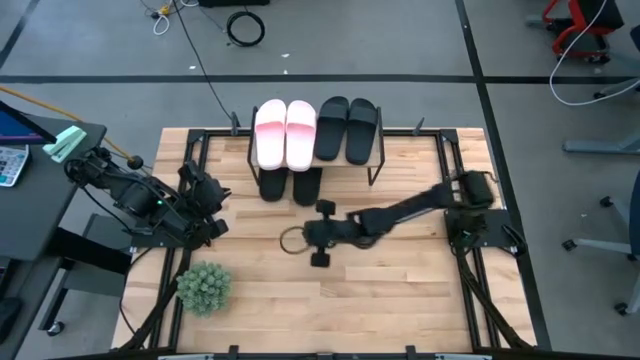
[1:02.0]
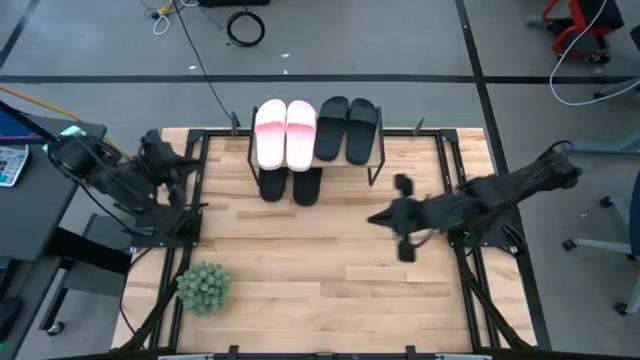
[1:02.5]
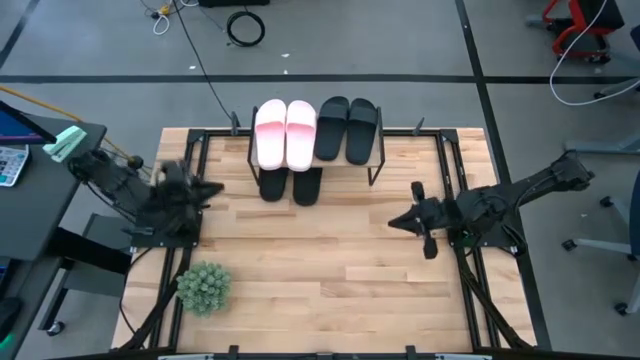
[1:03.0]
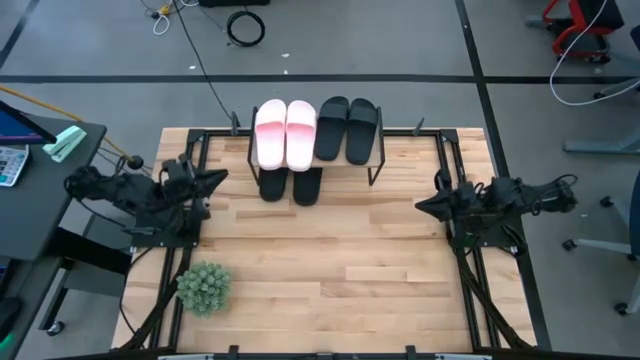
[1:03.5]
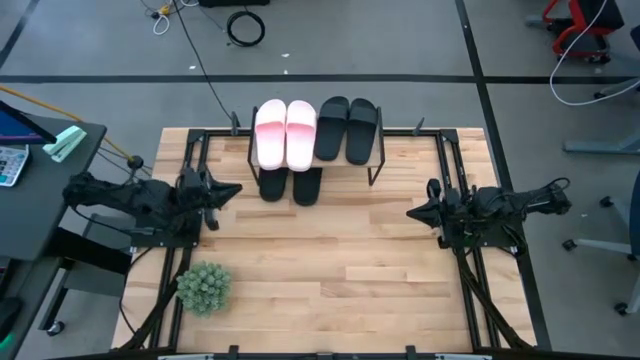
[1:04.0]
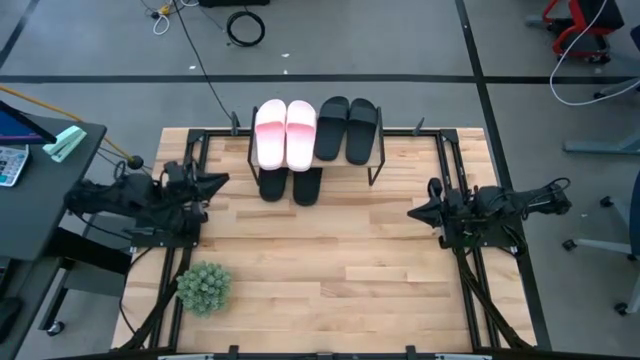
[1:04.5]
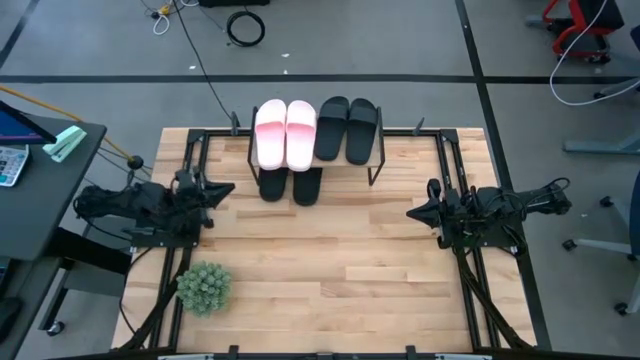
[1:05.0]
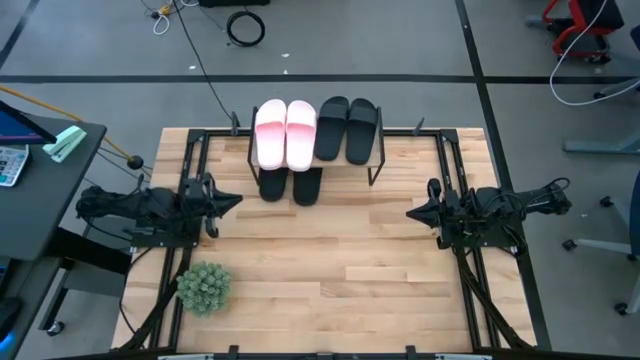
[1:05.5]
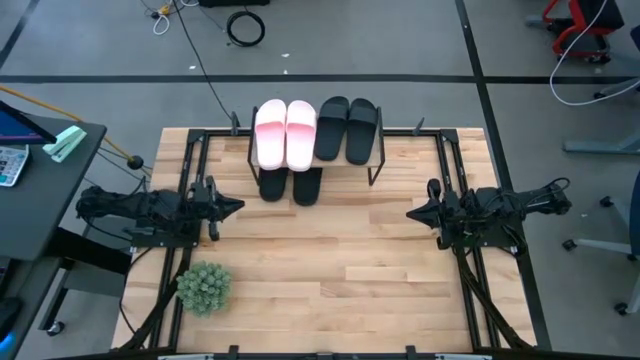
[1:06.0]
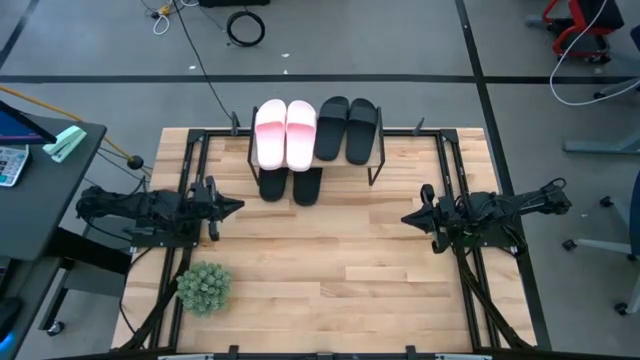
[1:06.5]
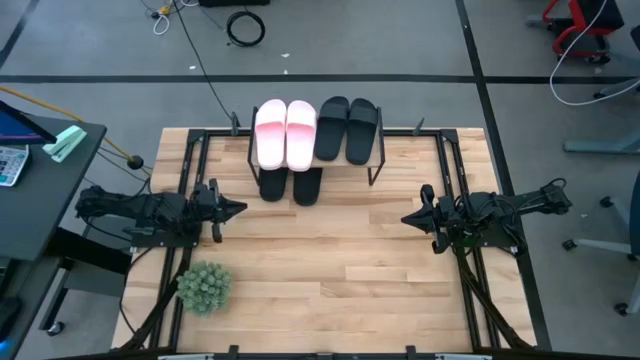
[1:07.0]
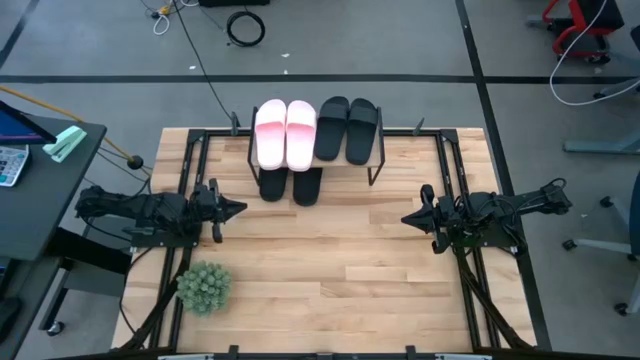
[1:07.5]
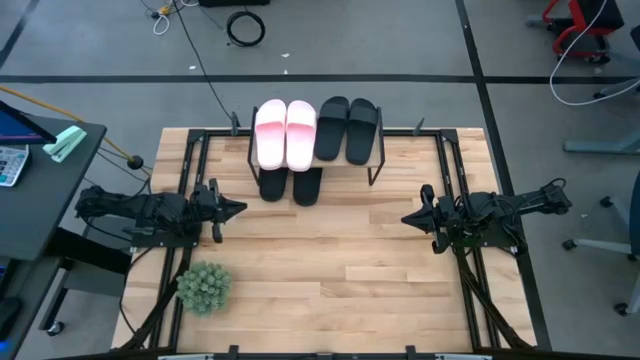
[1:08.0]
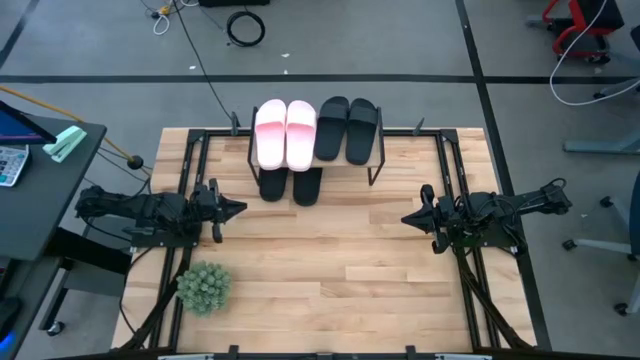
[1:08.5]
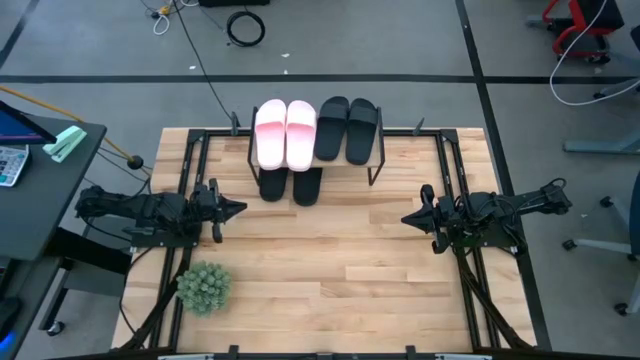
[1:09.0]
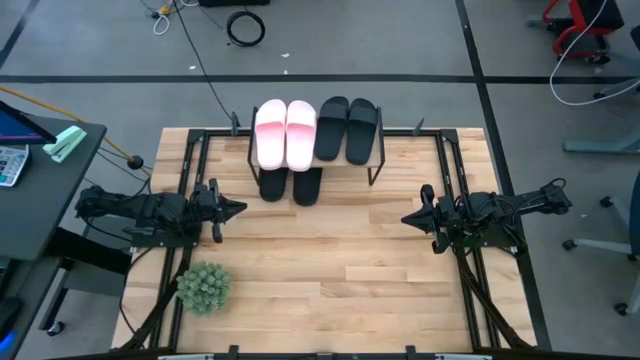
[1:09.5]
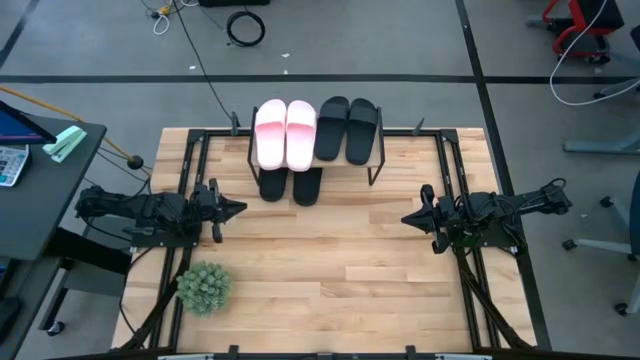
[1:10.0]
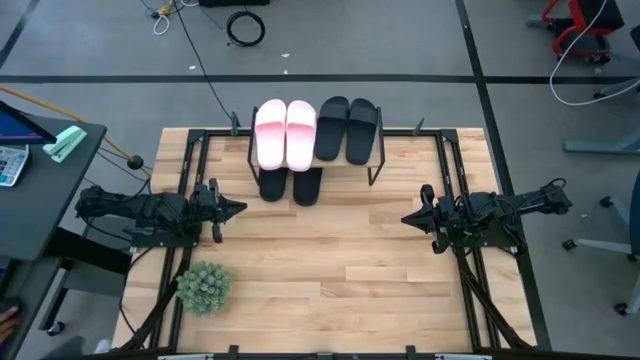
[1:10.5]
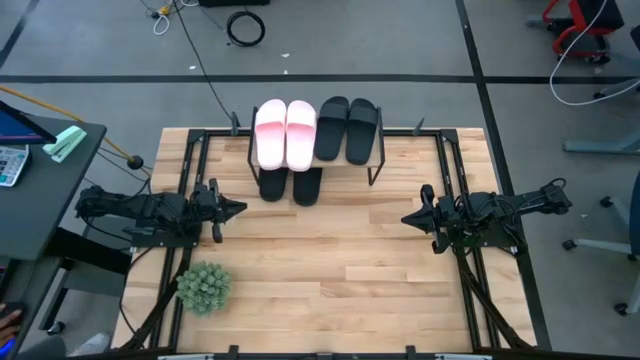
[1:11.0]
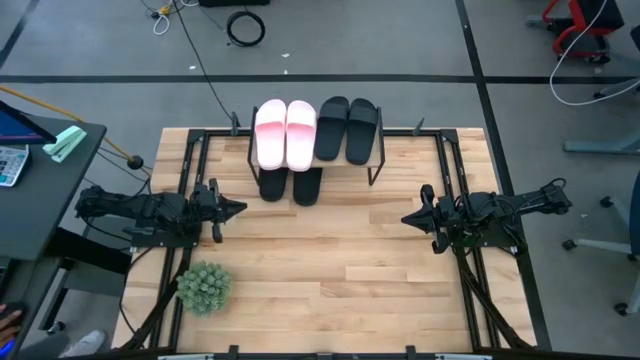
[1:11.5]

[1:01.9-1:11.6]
Task: Pick and place slides into the shelf
Return to Home Position

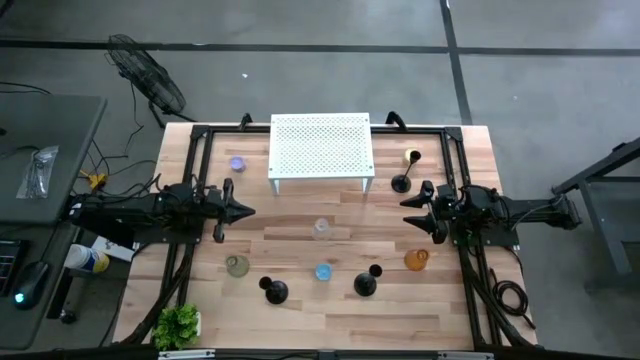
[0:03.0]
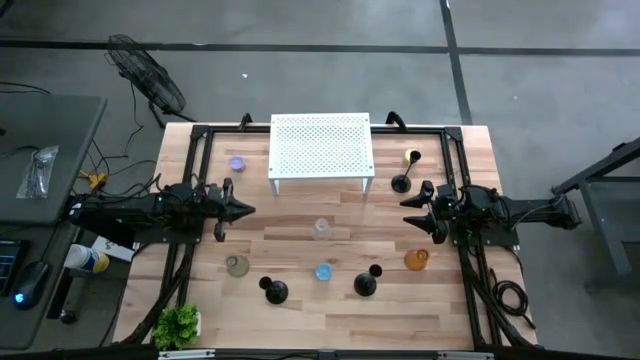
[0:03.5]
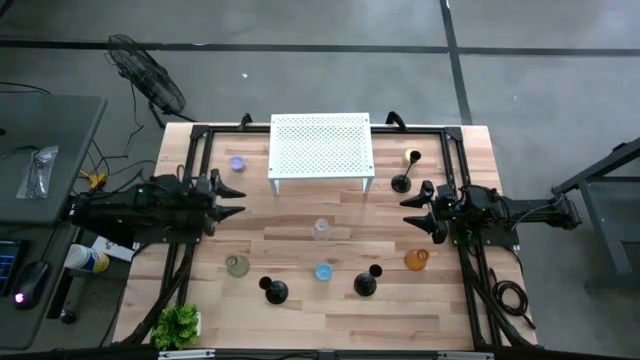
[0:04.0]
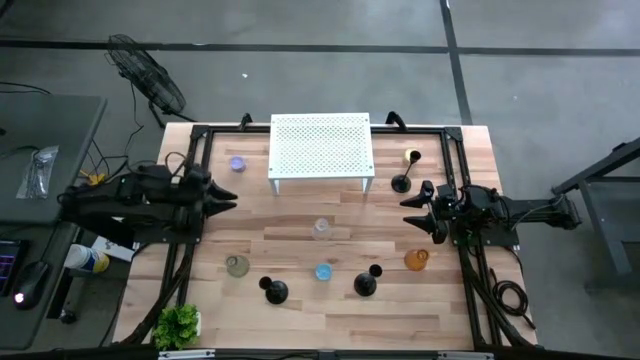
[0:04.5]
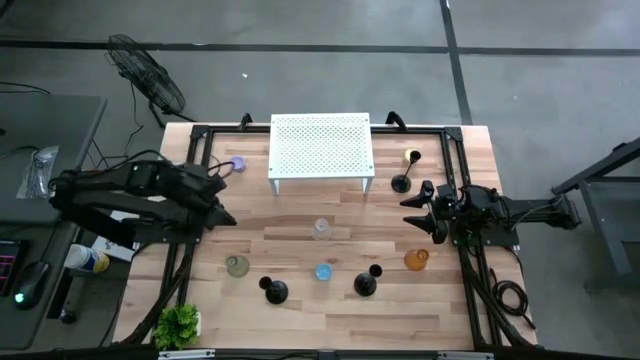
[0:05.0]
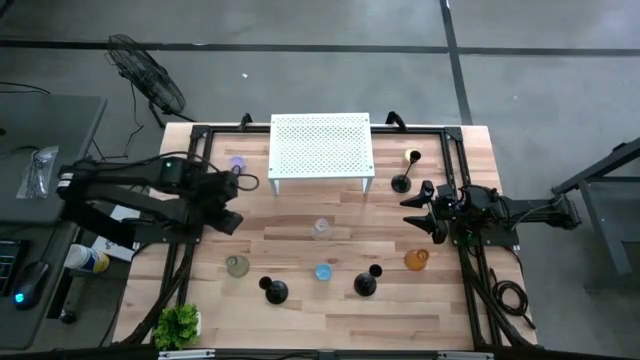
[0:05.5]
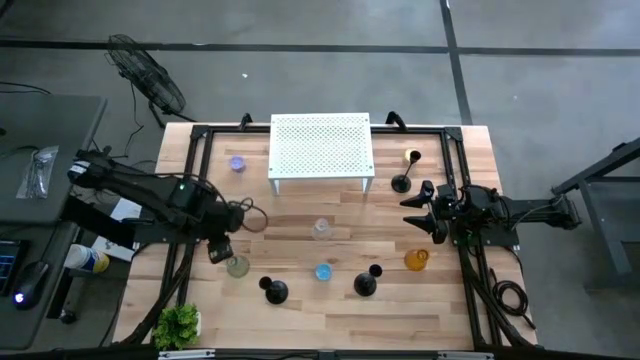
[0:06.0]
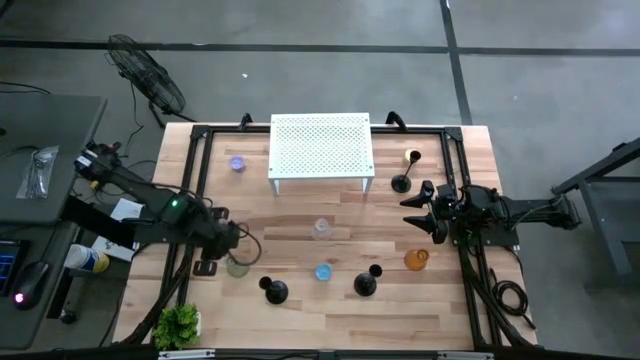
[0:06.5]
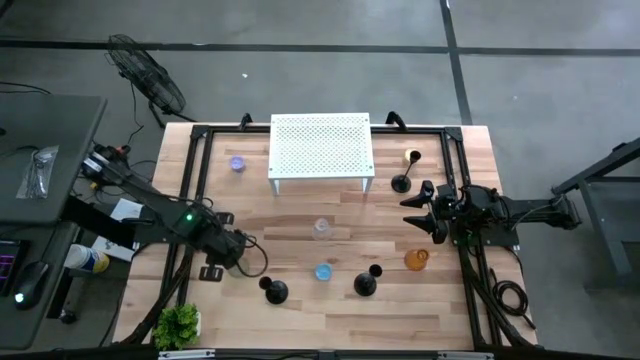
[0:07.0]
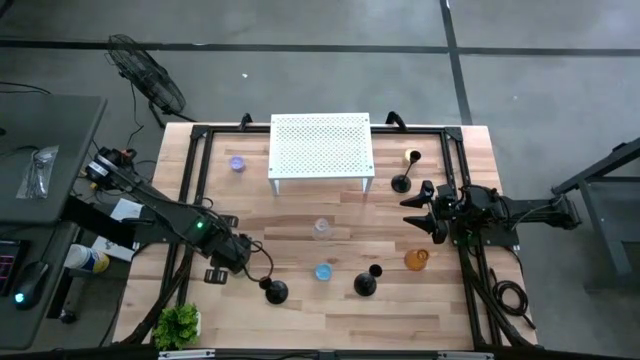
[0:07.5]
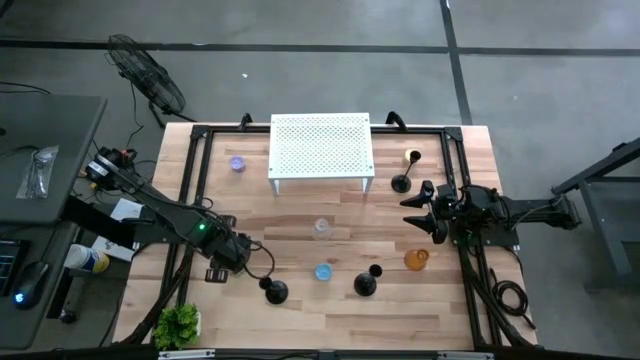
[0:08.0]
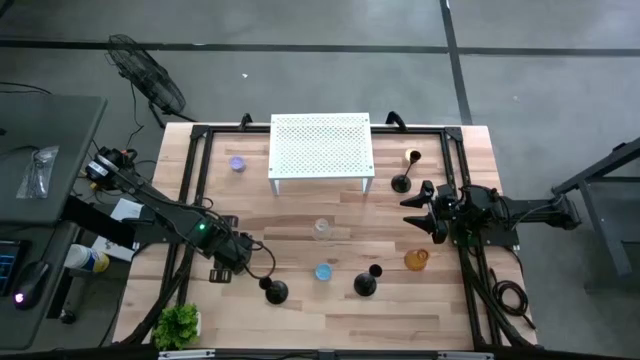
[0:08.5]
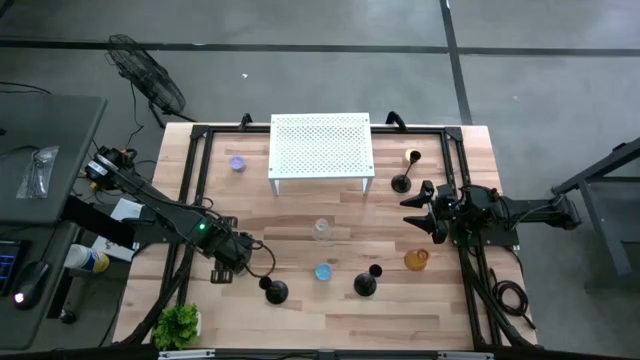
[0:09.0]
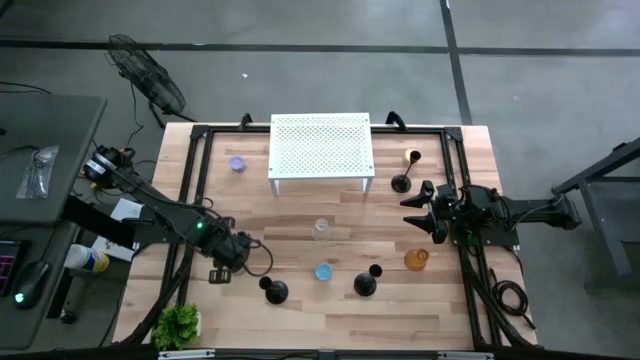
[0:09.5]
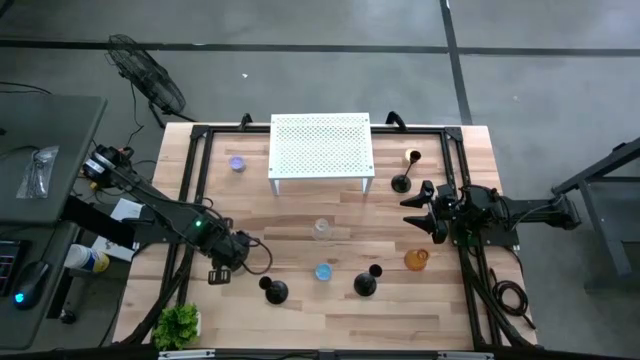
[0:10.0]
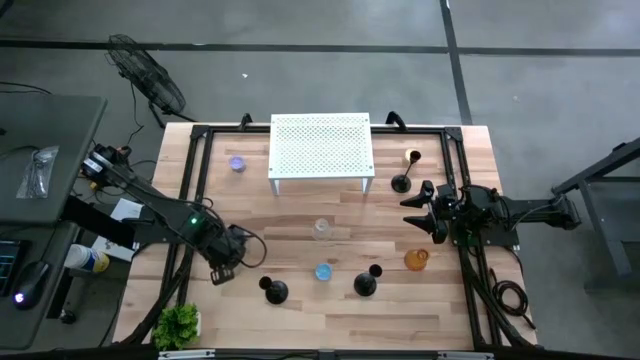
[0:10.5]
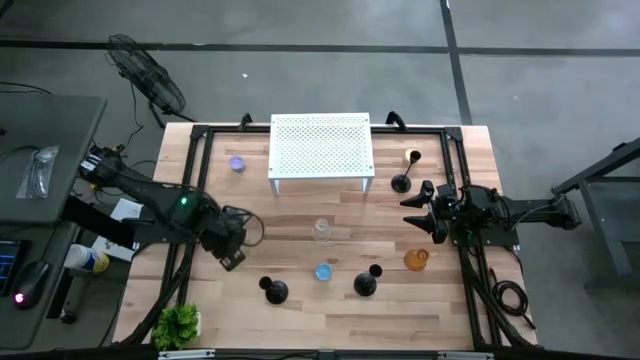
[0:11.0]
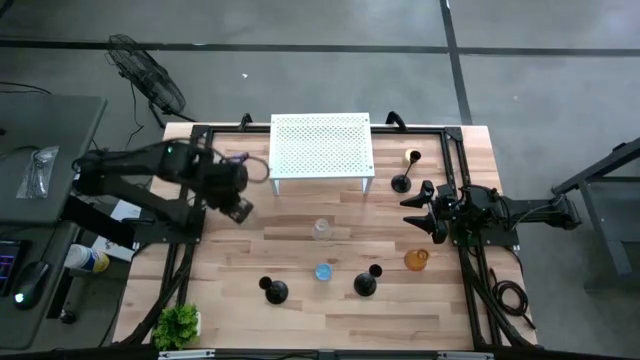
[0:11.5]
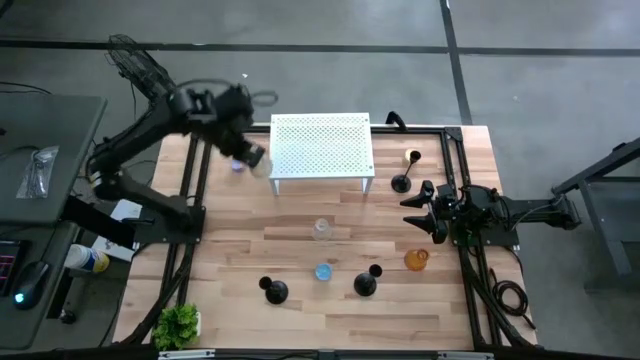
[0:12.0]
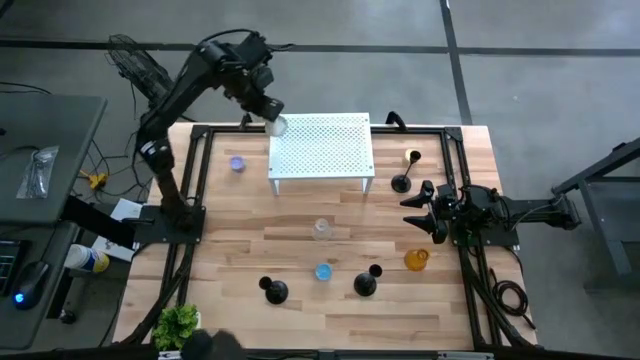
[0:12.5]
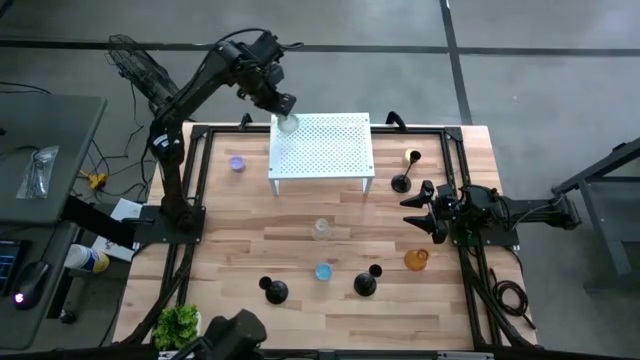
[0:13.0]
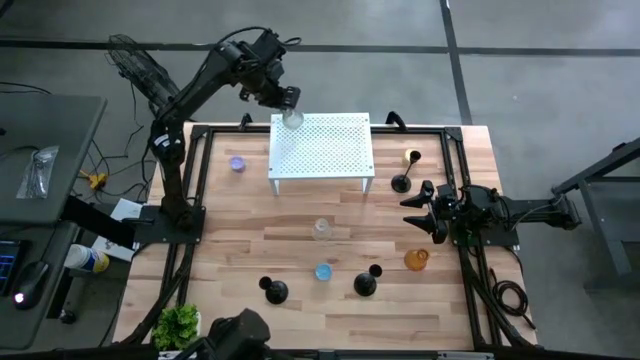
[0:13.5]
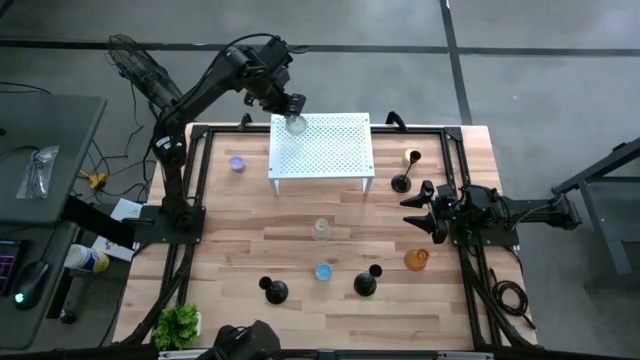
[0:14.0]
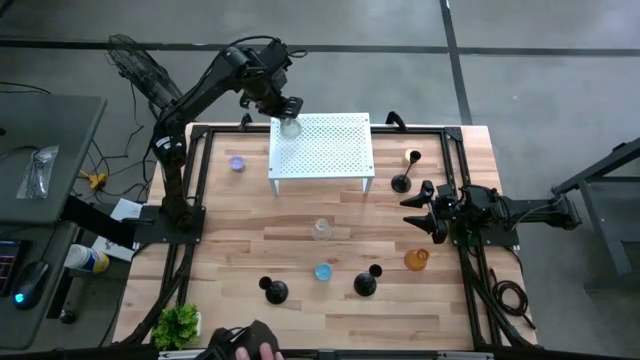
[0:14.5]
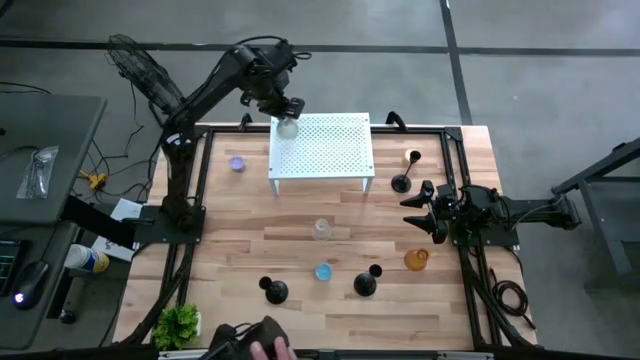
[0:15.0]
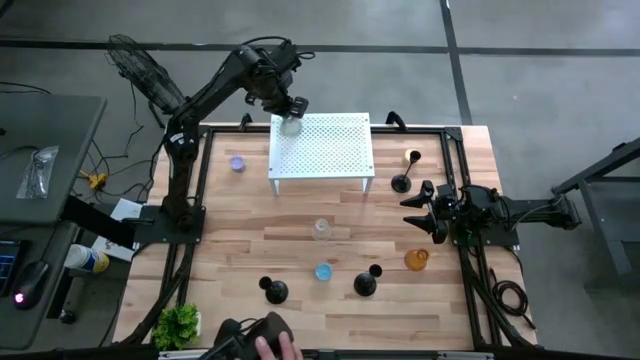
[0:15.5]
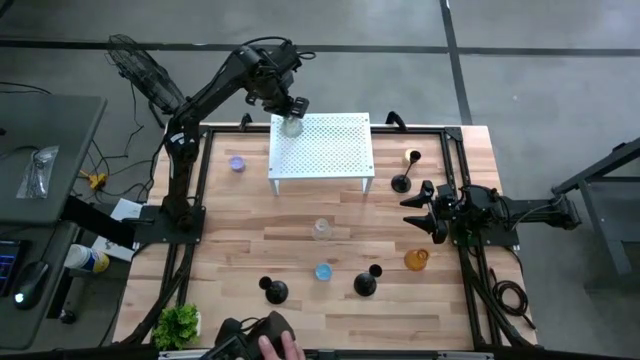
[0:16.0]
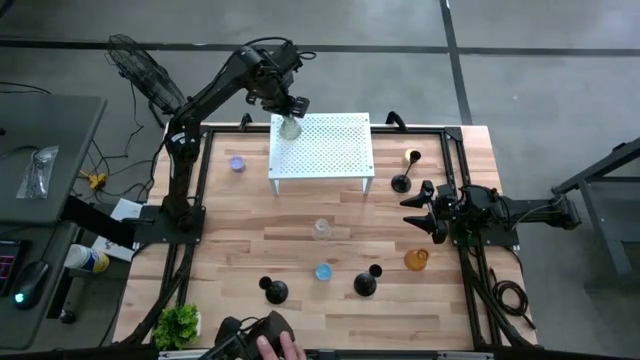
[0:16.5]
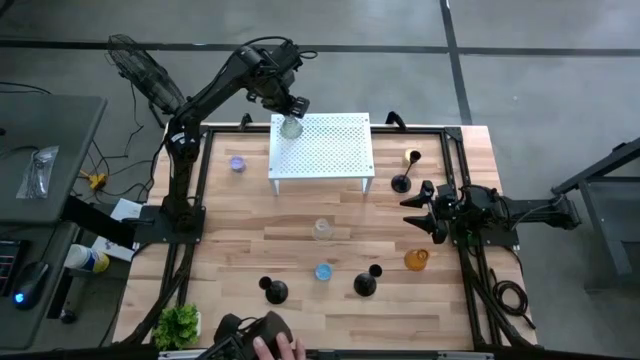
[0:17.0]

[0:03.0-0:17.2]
Task: Pick & Place candle stick holders
Put the green glass candle holder on the shelf
